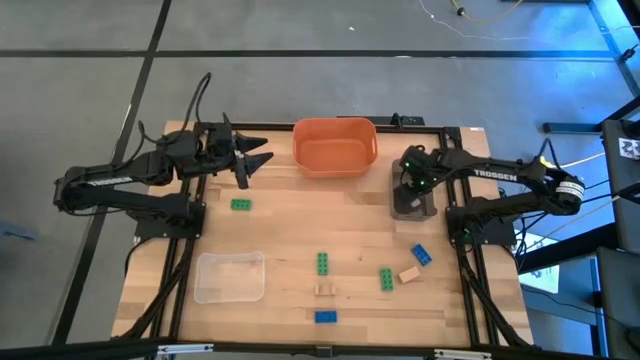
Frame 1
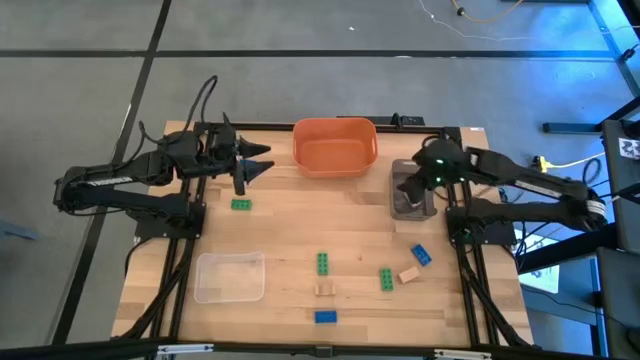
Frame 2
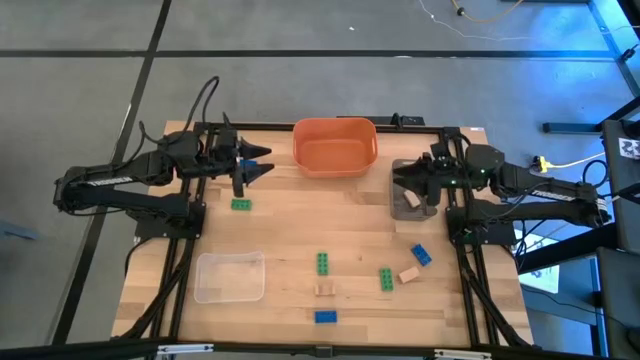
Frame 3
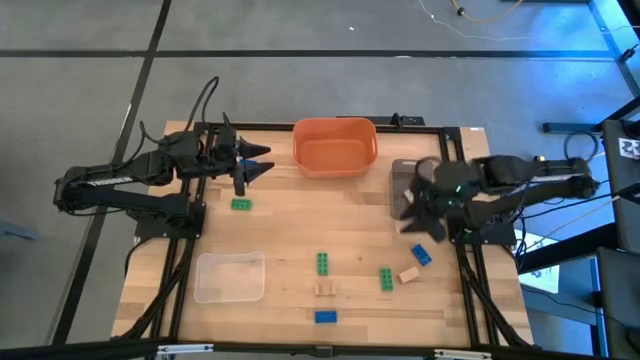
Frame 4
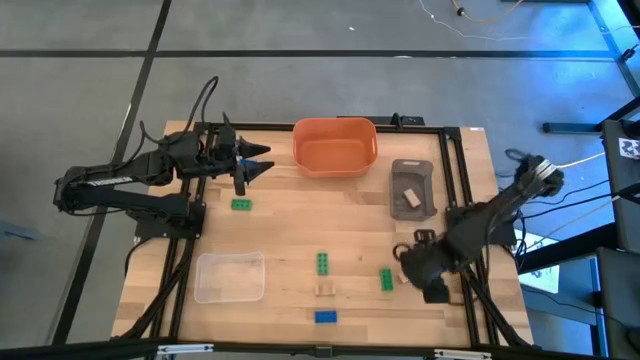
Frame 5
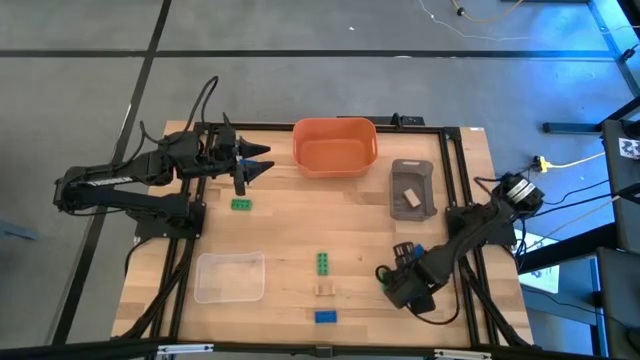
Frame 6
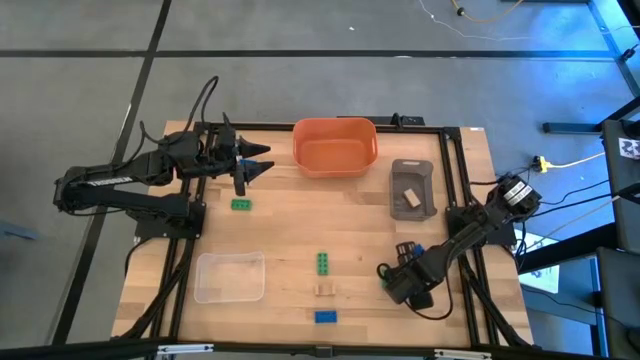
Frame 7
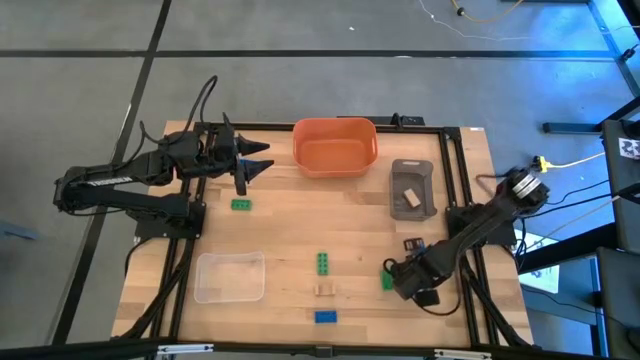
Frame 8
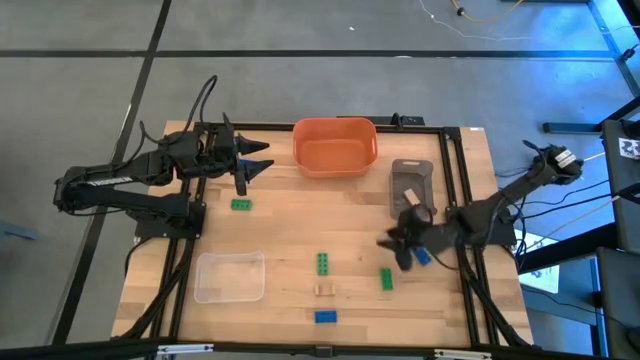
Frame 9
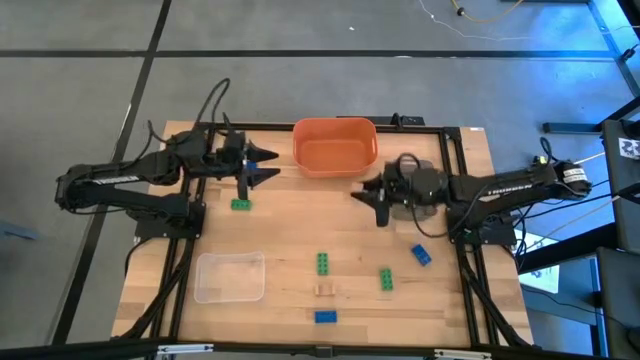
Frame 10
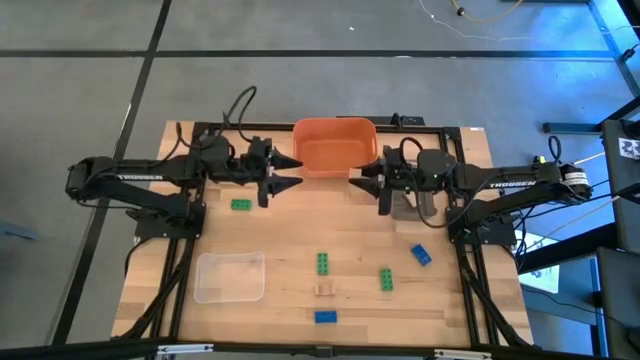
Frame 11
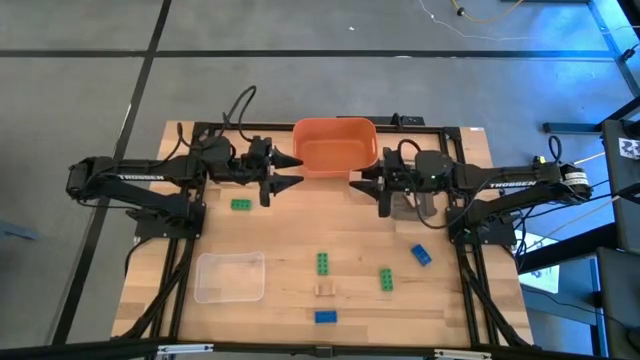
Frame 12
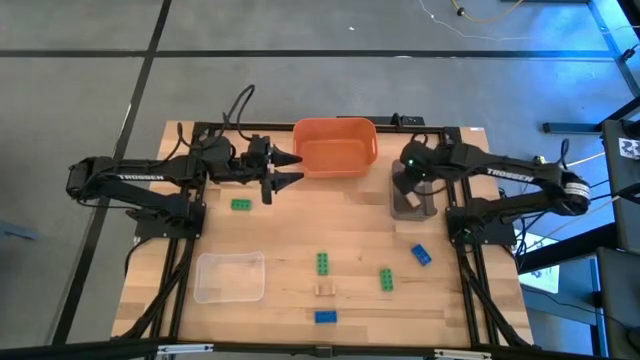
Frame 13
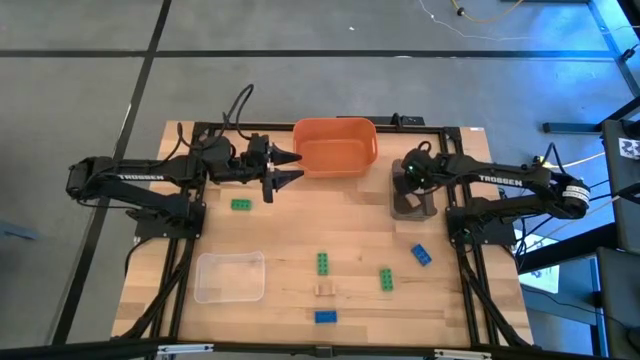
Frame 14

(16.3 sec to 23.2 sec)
Task: Sort & place blocks by color
Put the right brown block into the black bin

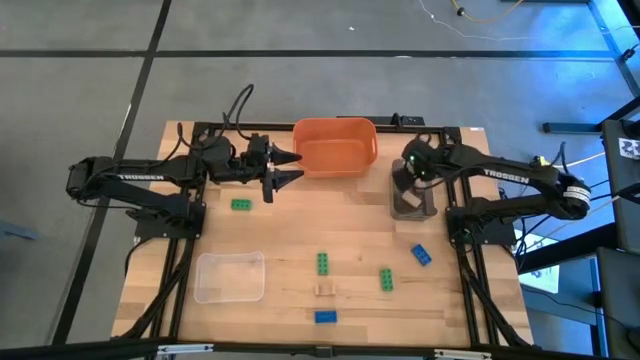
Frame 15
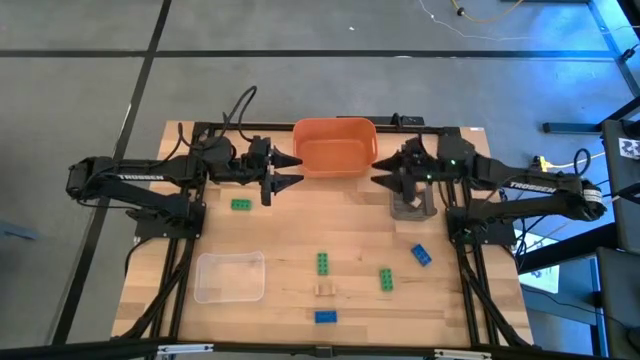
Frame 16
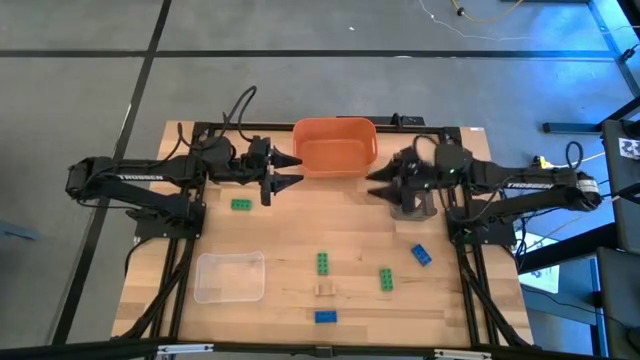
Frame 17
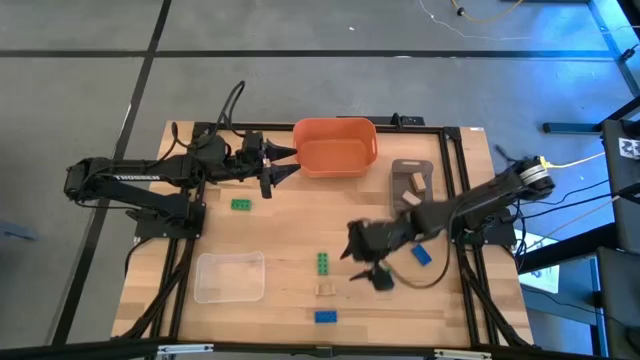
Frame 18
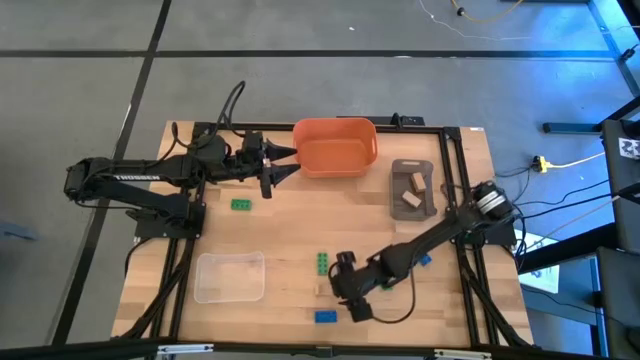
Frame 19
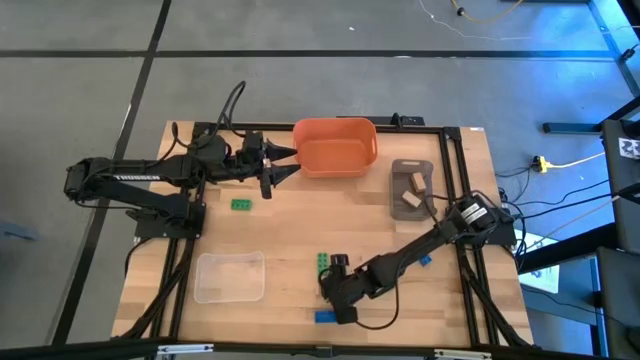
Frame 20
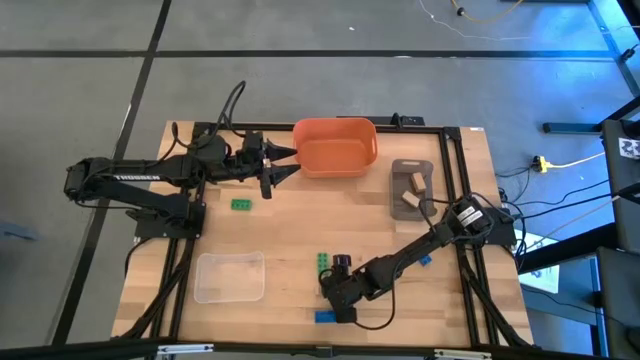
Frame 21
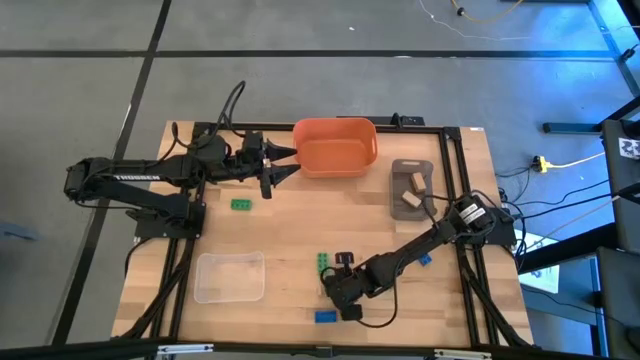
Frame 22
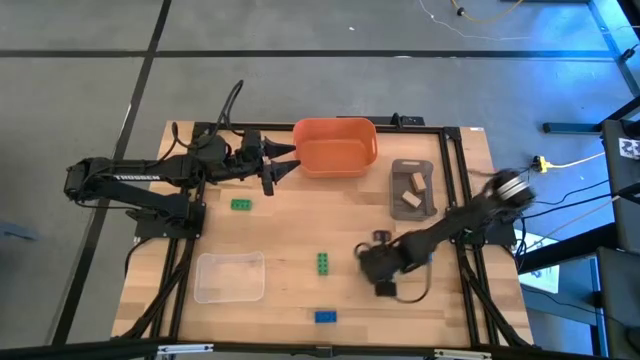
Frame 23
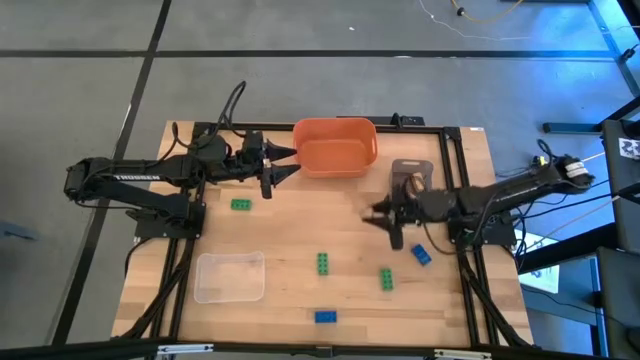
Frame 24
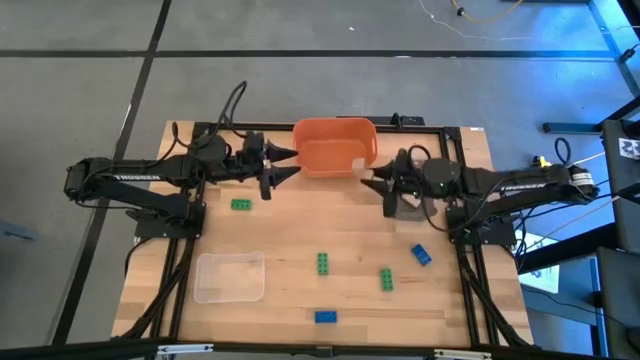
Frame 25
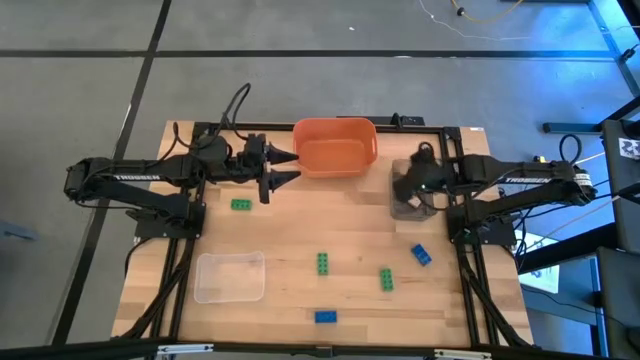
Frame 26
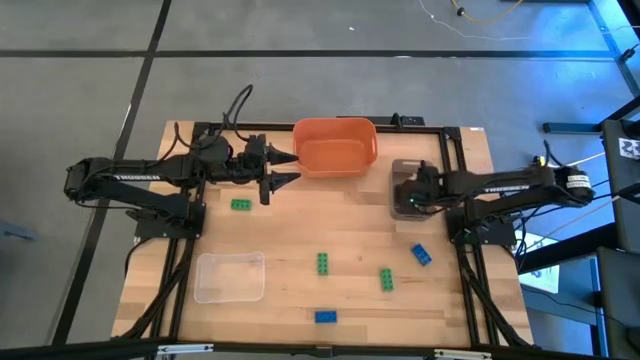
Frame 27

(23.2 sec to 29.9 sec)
Put the brown block into the black bin

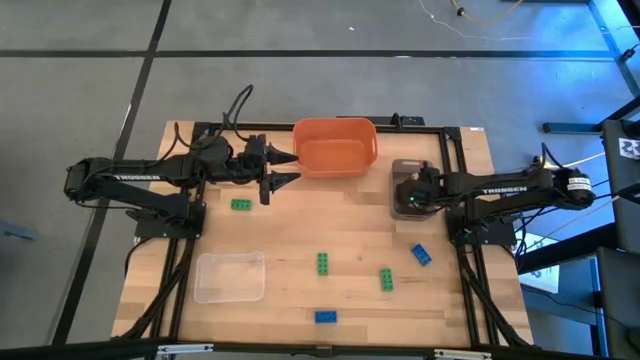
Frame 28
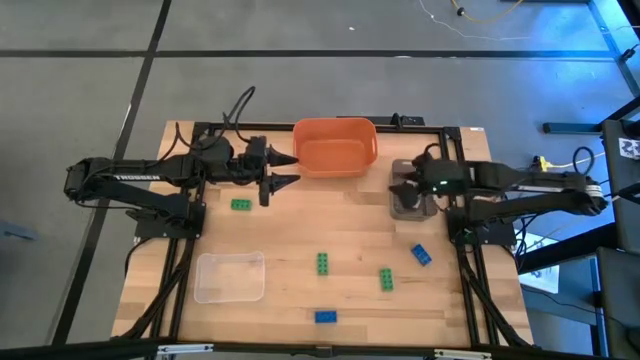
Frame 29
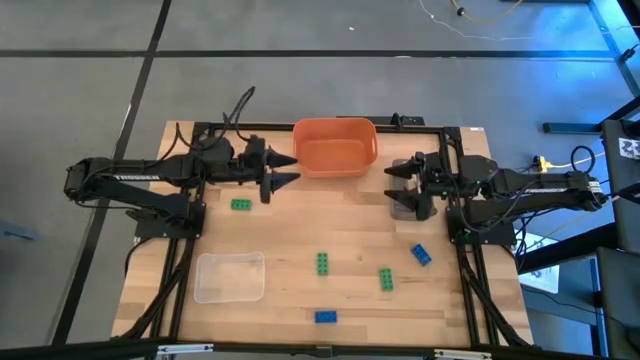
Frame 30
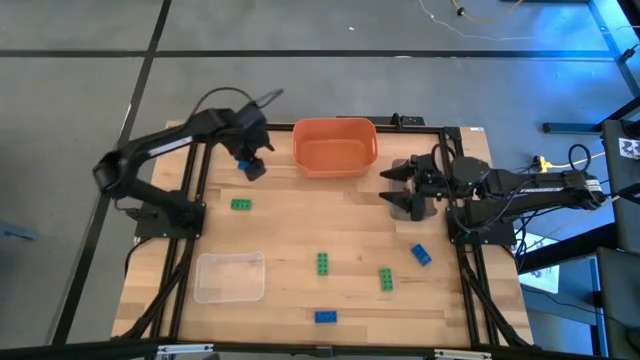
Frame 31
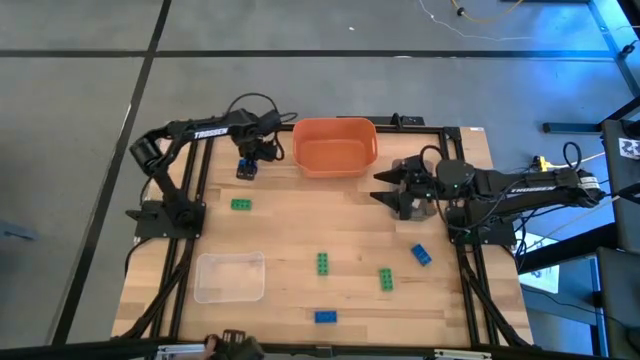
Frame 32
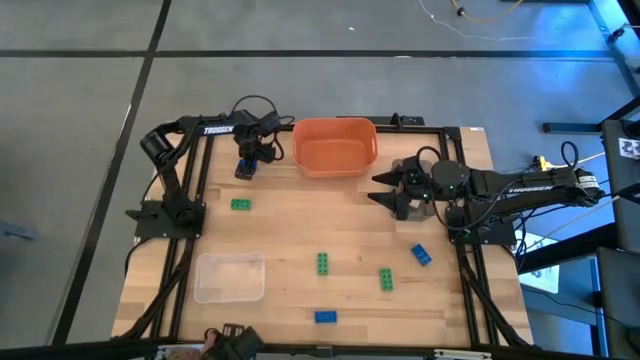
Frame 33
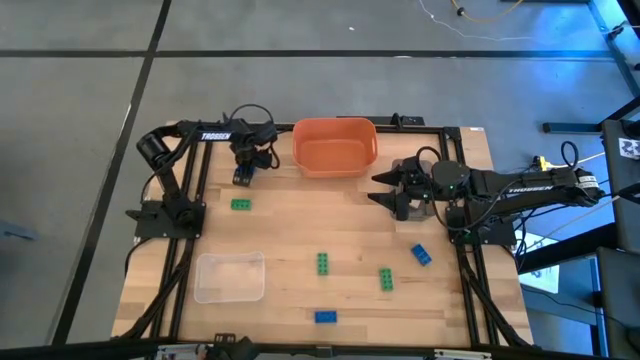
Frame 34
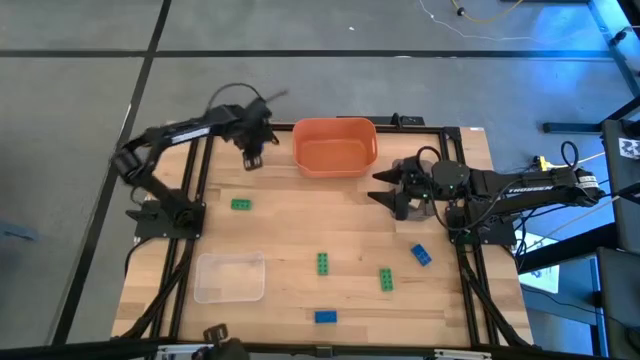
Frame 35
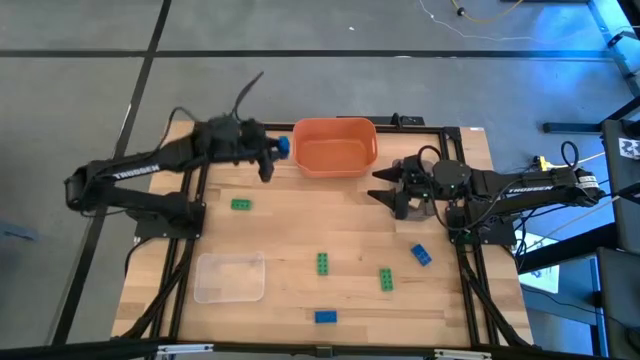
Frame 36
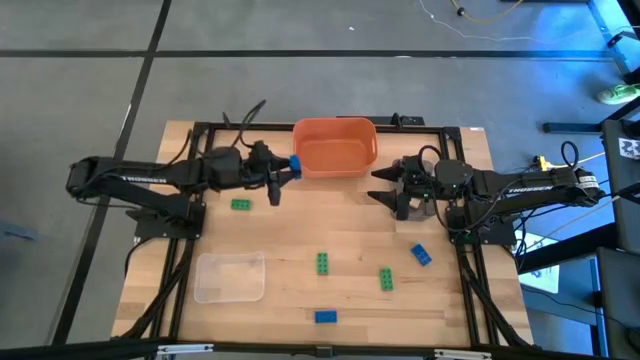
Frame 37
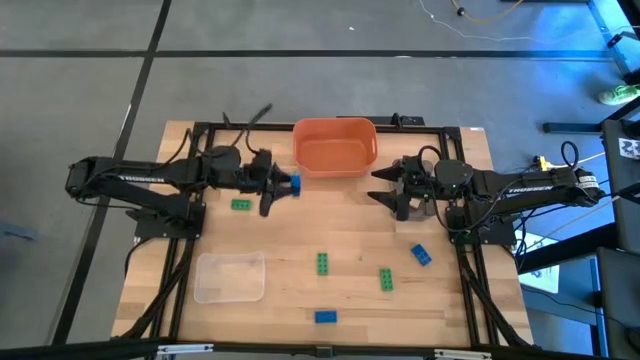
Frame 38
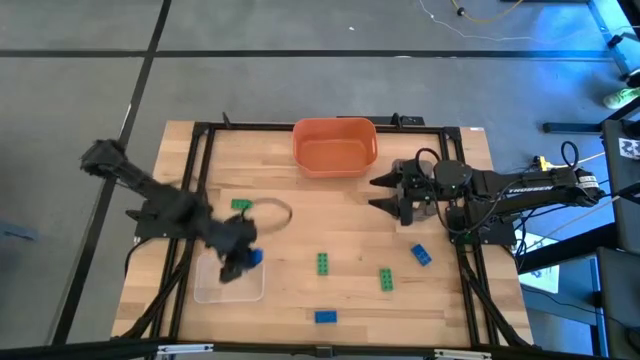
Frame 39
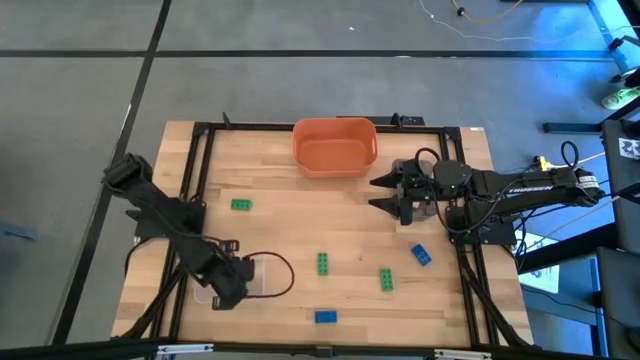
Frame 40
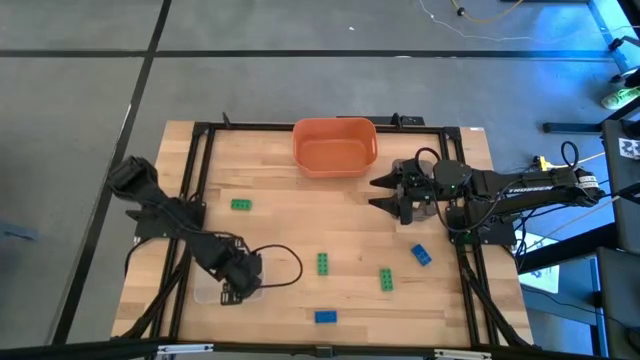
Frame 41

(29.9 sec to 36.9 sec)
Put the top left blue 8 stud game piece into the transparent bin

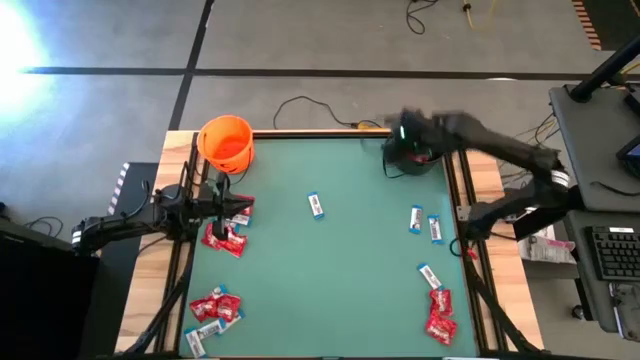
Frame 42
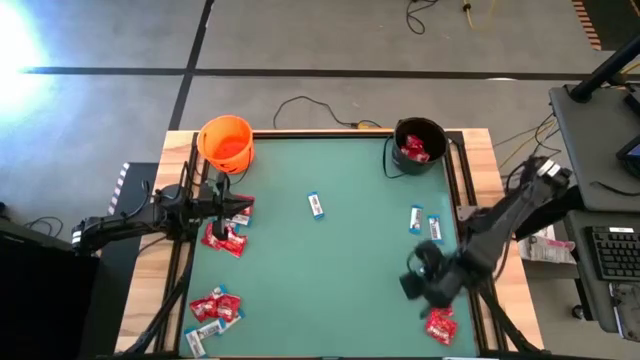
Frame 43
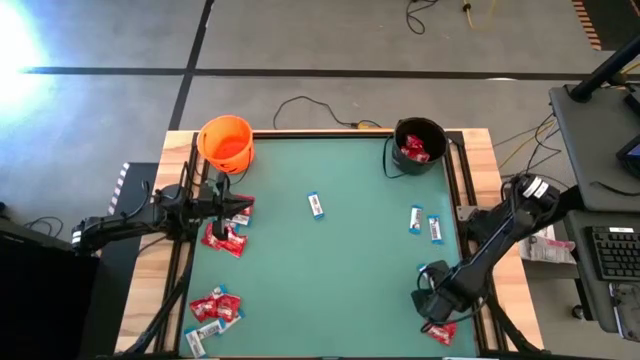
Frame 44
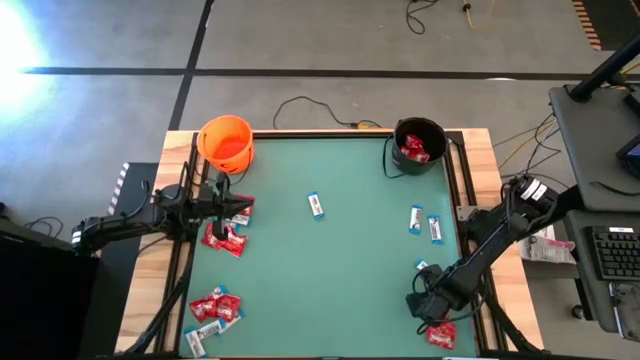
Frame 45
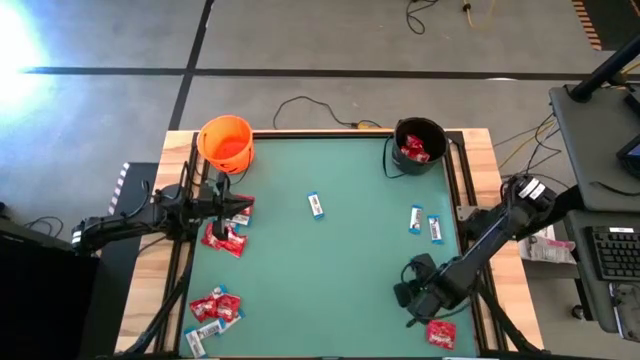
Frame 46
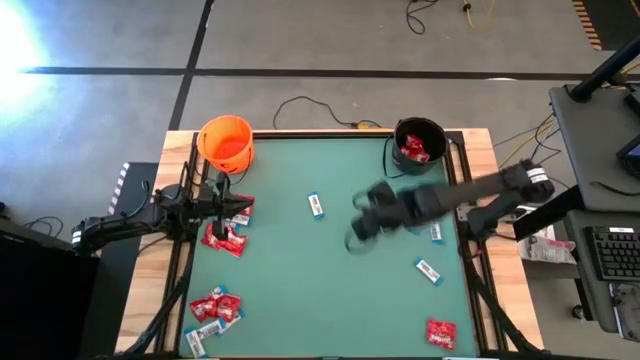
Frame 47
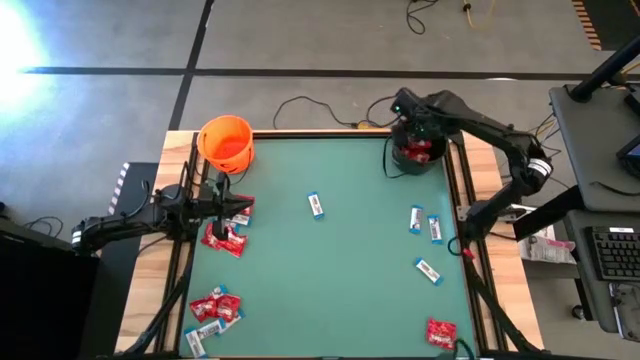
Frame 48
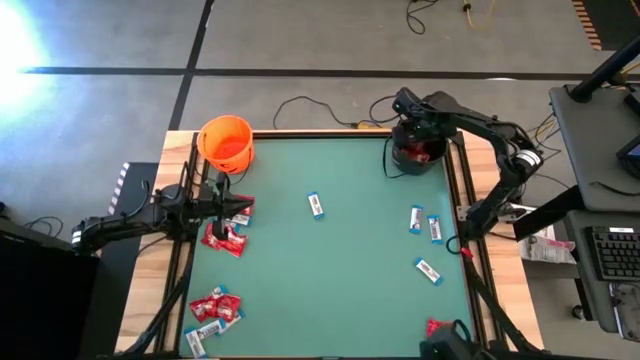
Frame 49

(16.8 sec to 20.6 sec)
Task: Sort candy by brand, put in halloween buckets
Put the red candy into the black bucket
